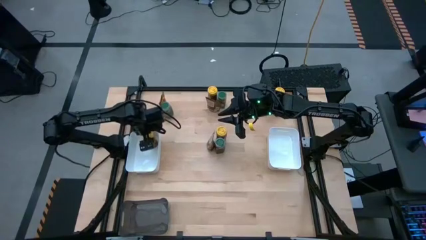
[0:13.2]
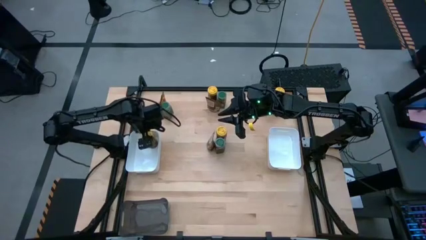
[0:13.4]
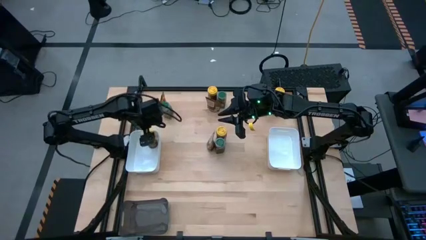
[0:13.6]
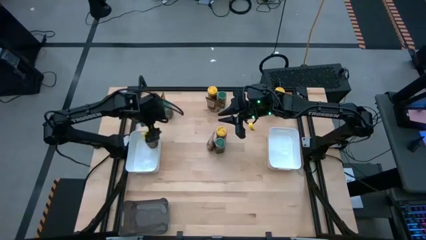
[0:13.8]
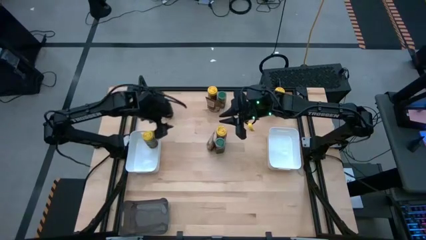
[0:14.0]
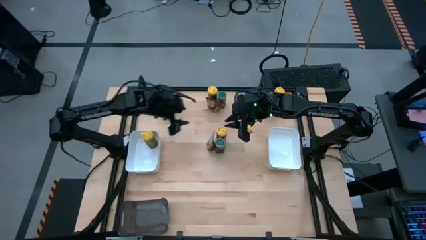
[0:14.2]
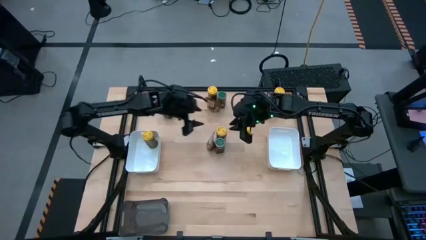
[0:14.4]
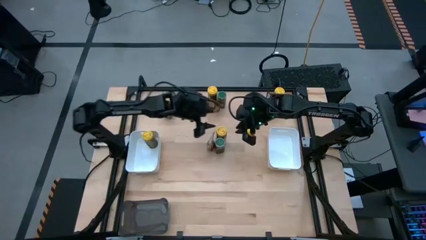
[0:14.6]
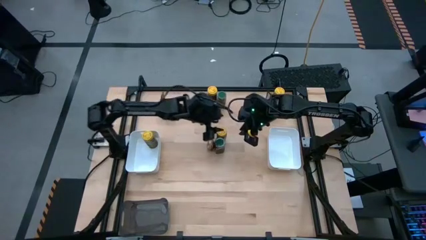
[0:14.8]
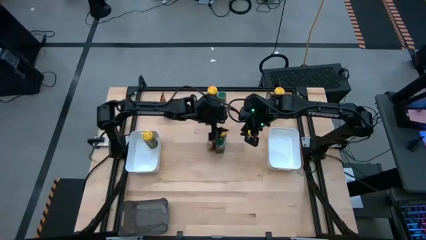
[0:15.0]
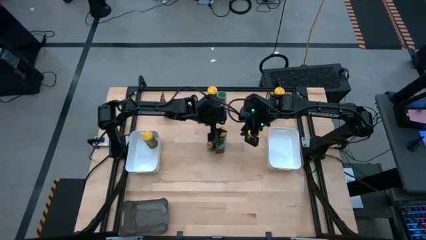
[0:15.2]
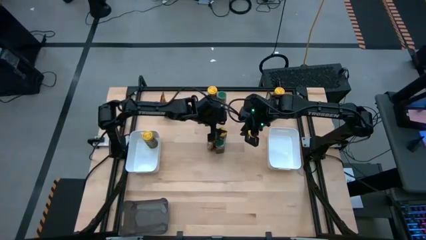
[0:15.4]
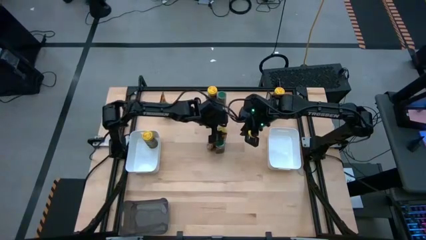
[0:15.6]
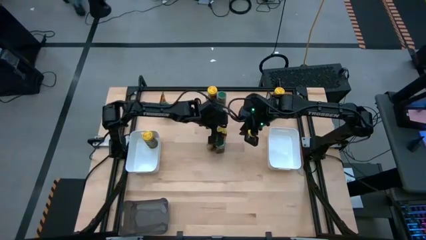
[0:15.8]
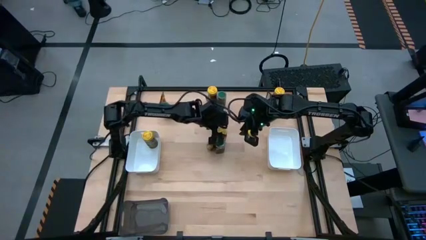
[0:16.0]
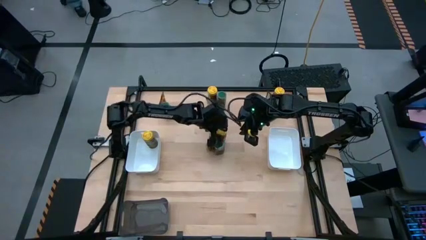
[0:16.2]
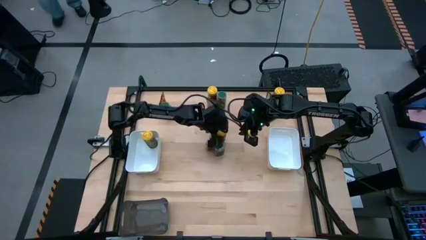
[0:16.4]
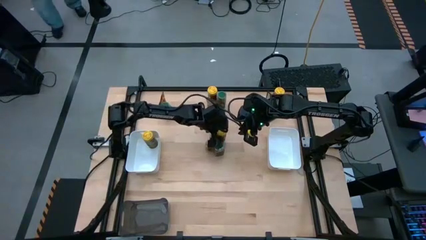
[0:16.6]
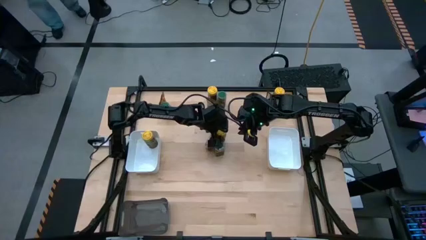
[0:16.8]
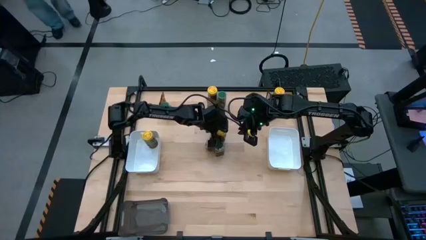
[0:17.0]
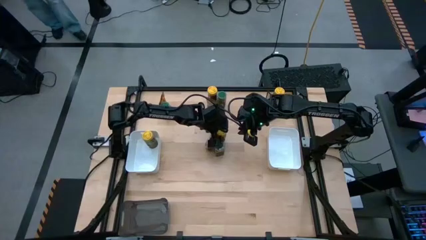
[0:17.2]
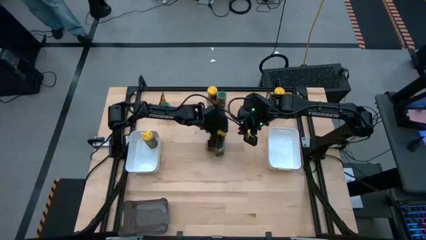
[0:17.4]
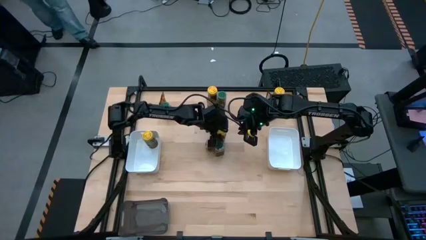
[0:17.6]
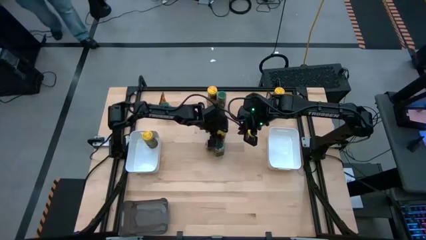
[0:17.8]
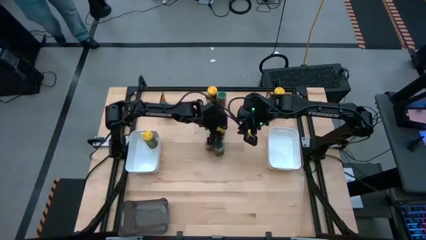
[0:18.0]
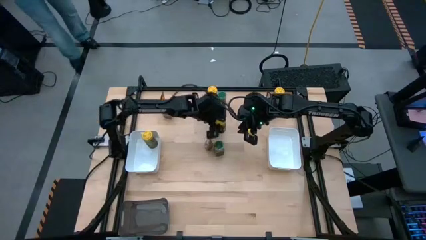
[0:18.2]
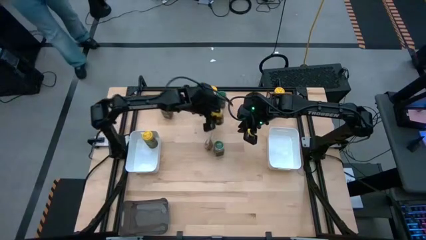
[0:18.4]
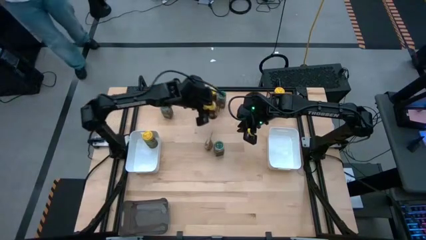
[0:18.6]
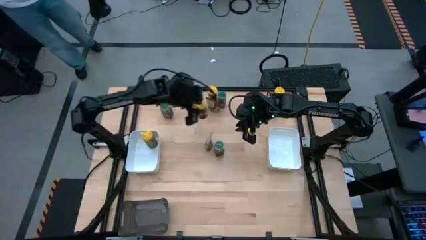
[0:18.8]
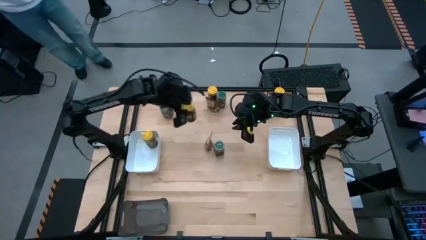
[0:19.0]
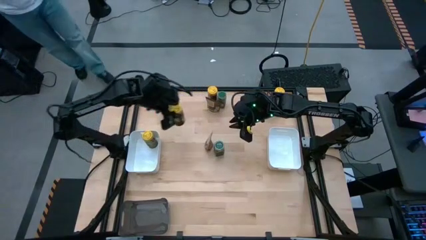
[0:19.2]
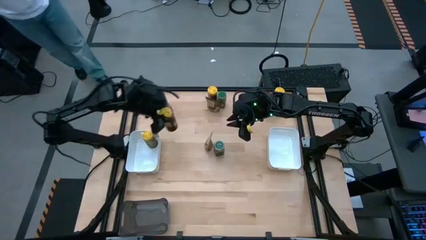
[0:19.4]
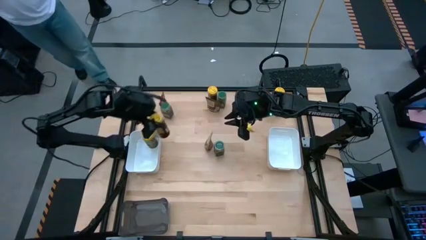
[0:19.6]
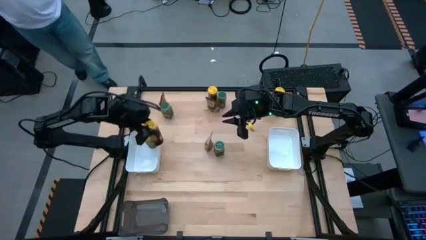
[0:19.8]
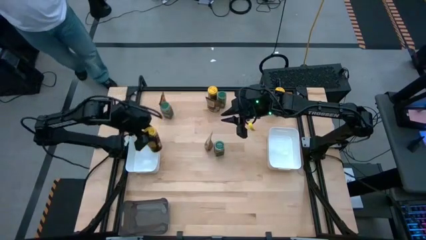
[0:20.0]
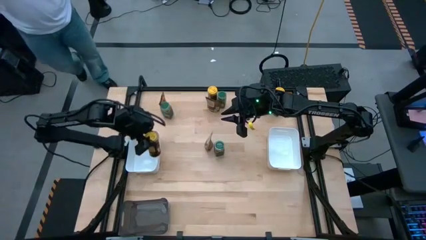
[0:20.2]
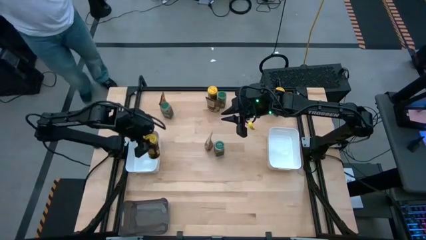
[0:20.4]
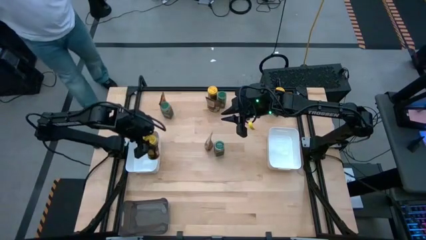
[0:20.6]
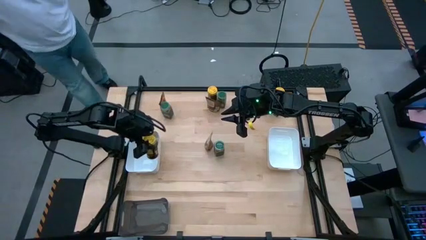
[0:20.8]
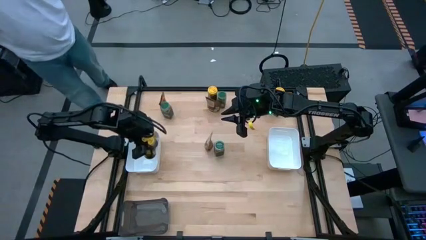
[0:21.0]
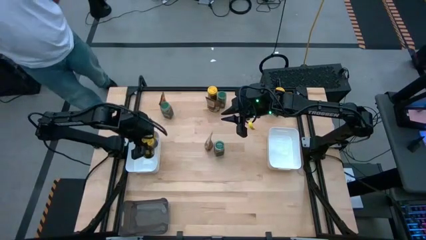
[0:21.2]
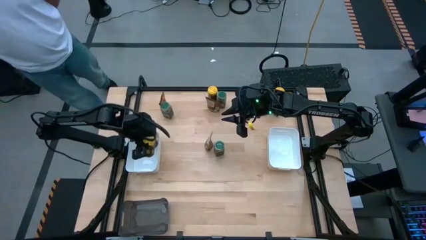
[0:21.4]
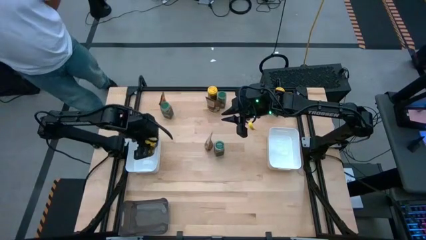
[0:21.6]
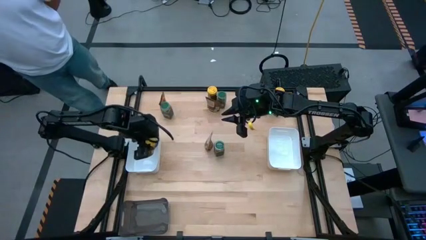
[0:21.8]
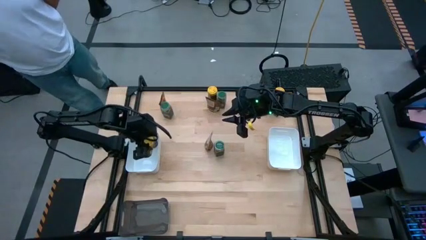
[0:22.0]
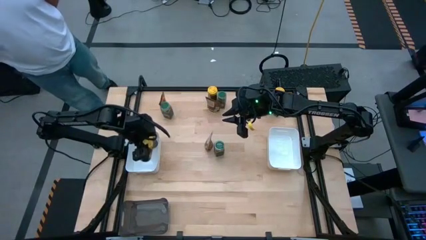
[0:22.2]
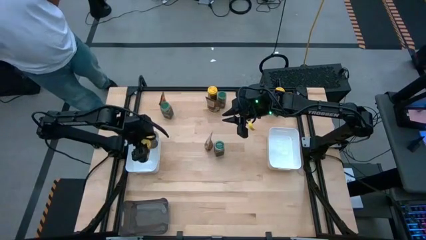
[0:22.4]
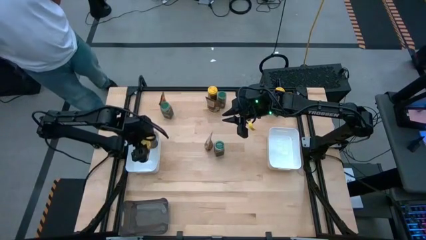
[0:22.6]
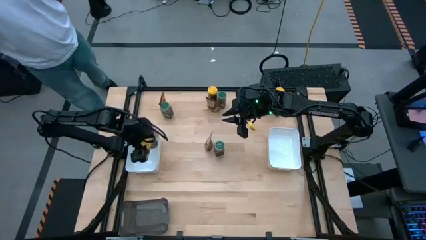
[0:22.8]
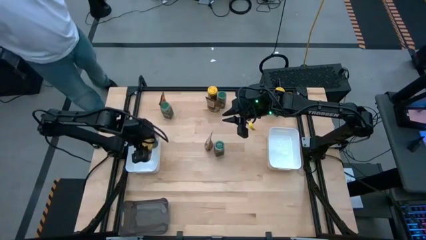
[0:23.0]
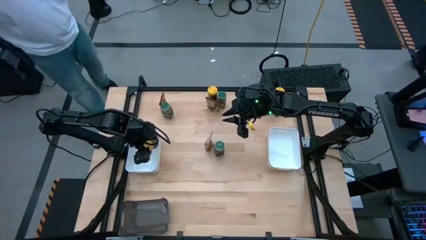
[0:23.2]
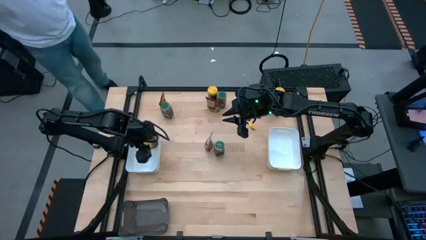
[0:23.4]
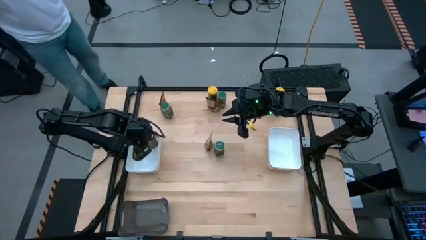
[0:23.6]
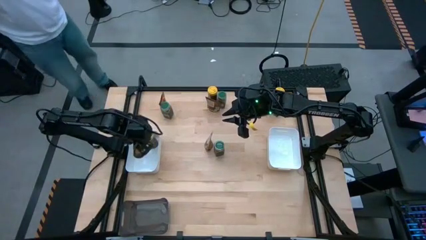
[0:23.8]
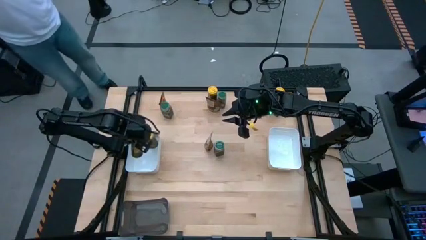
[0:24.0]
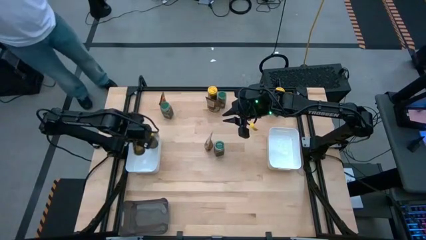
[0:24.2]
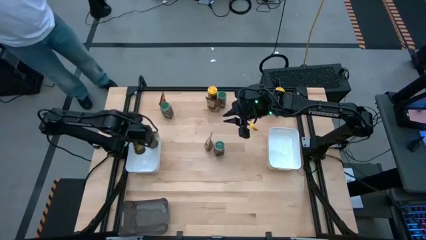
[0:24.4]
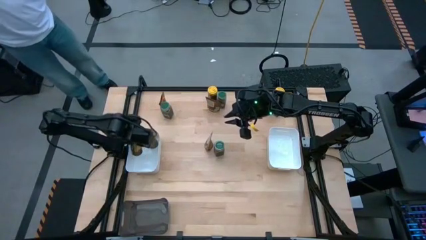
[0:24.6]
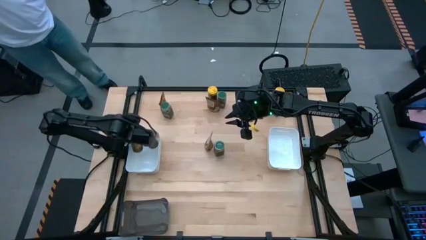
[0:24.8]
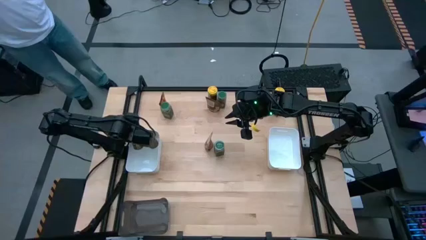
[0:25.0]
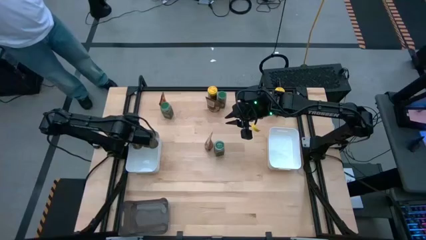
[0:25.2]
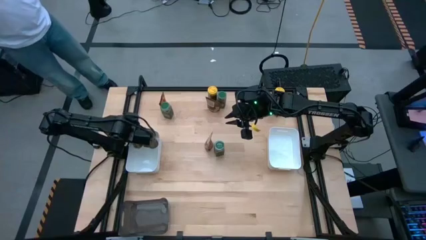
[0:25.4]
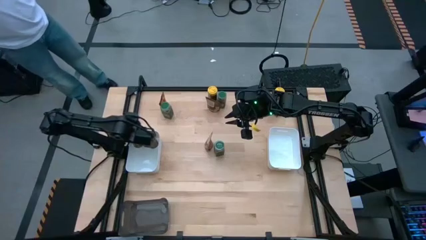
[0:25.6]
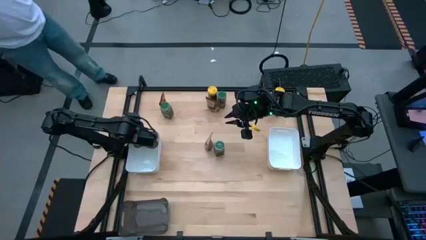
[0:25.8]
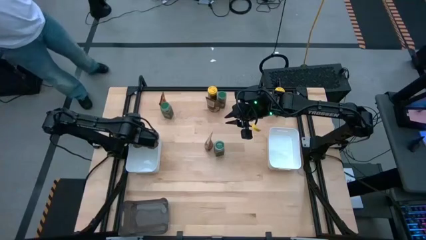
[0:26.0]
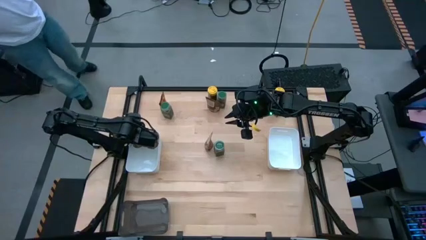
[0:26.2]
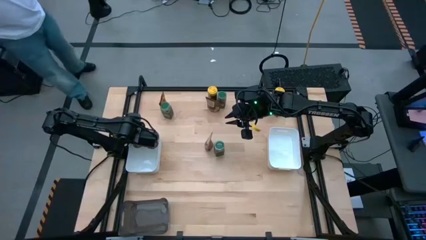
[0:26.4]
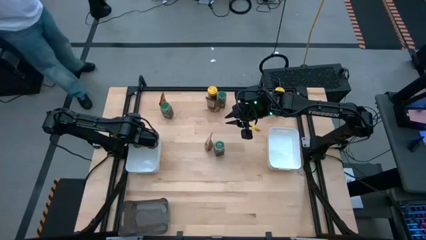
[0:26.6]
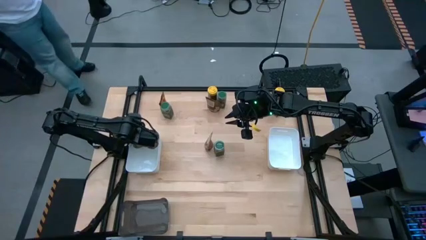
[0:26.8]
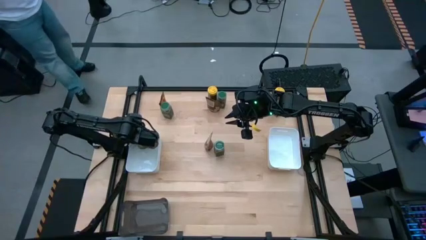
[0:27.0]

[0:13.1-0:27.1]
Task: Sort spices by type
Put the bottom left yellow seasoning bottle into the left white bin
